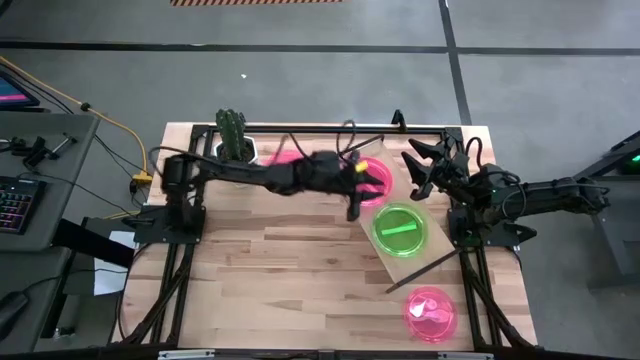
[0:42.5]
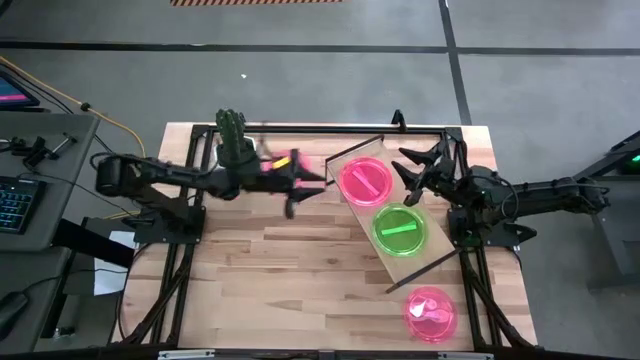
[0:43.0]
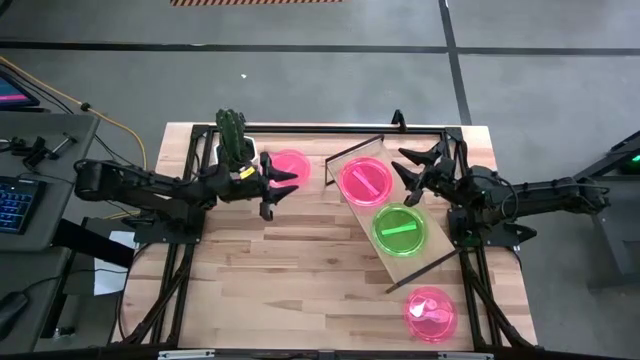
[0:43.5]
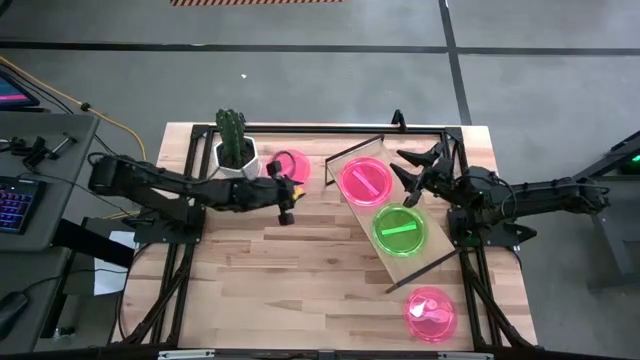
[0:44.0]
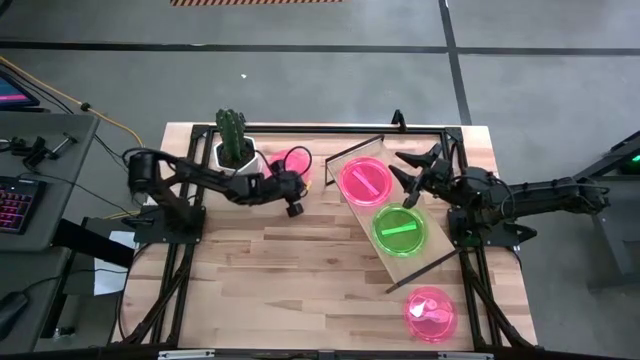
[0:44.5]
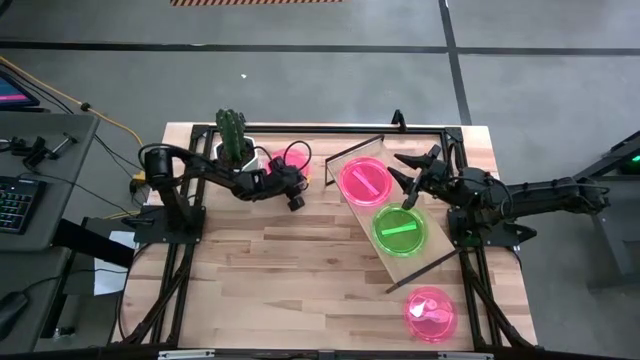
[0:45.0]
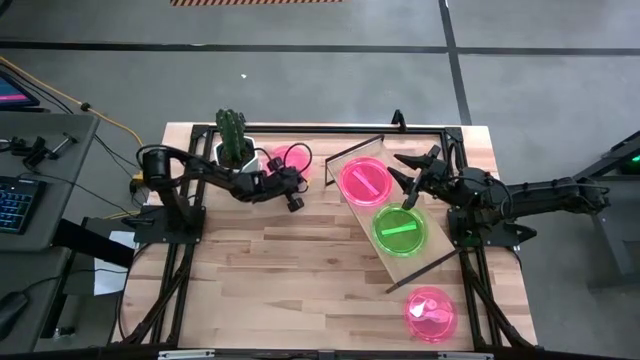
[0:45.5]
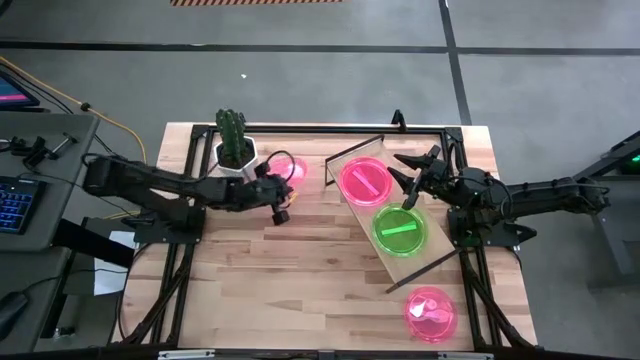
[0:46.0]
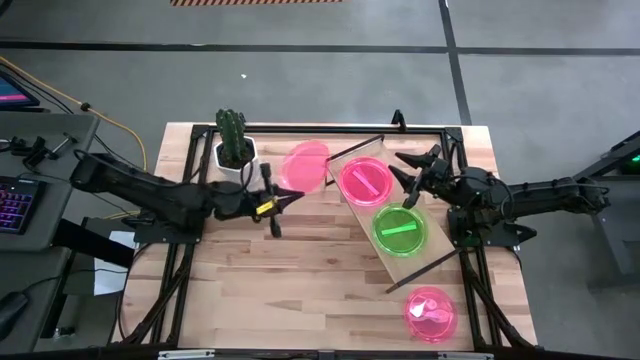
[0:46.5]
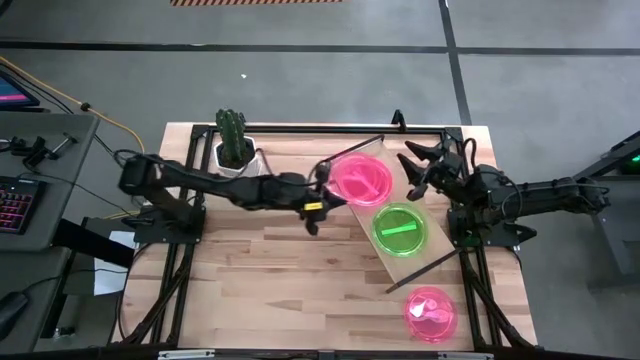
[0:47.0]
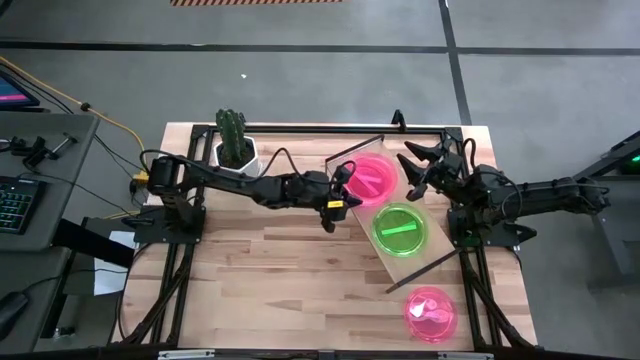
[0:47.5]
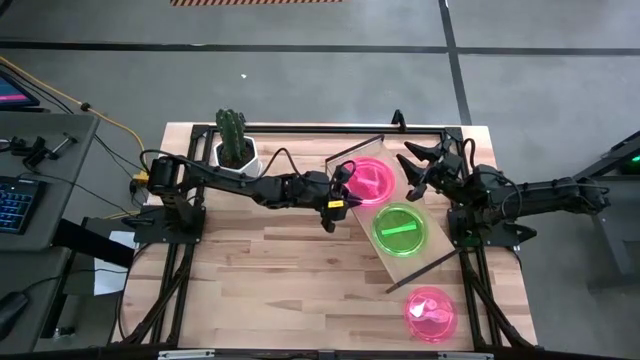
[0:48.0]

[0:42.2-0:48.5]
Task: Place and stack plates onto a shelf
Stack the pink plate on top of the other pink plate on the shelf

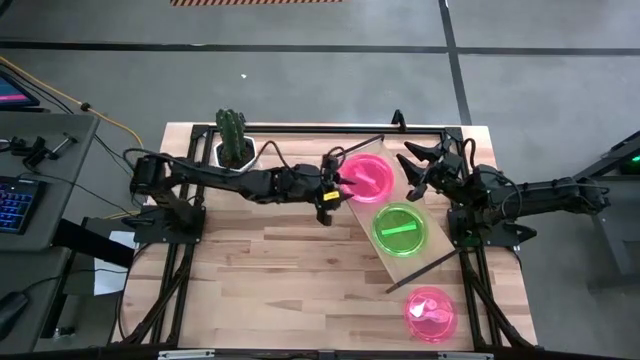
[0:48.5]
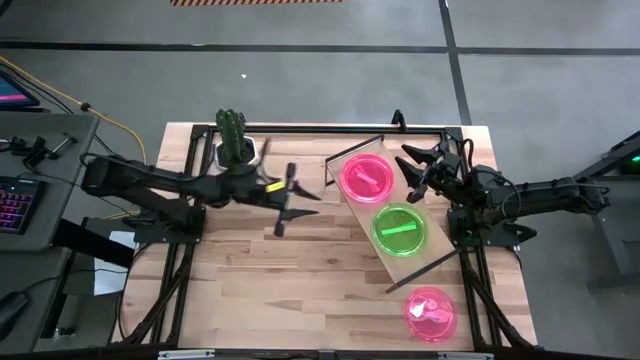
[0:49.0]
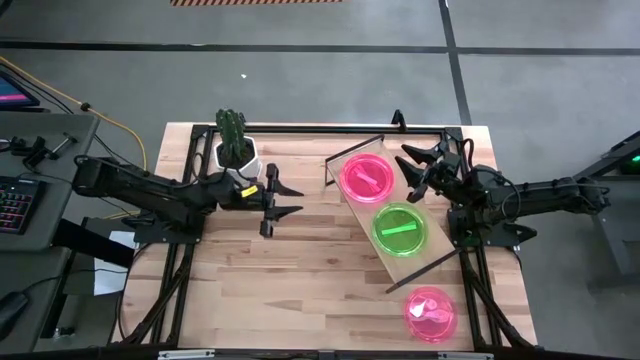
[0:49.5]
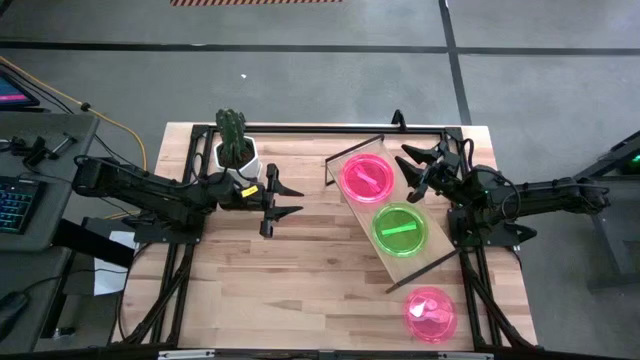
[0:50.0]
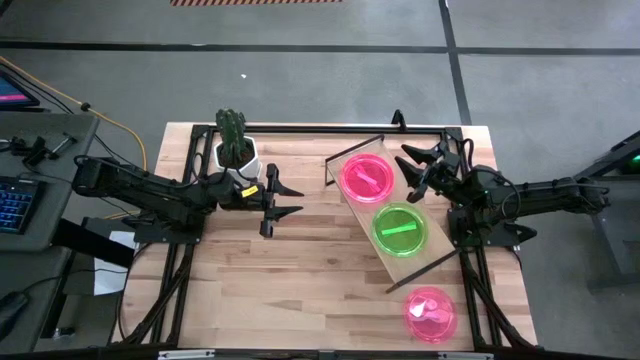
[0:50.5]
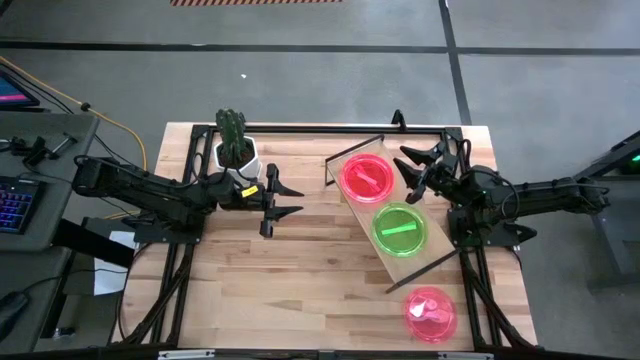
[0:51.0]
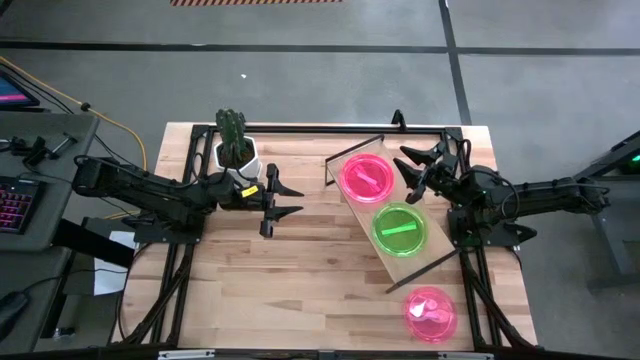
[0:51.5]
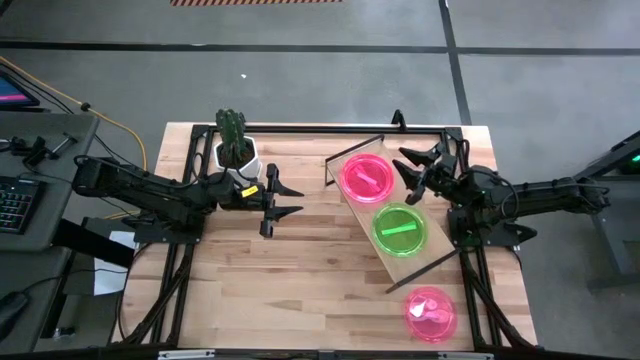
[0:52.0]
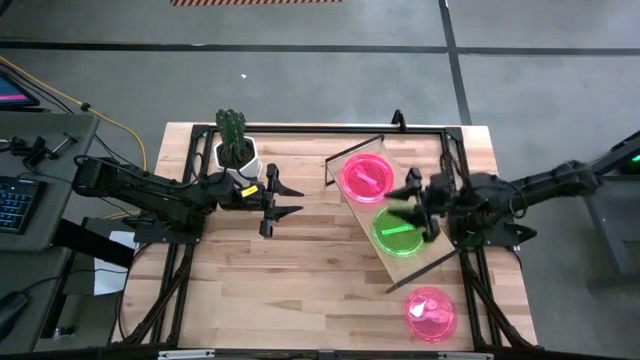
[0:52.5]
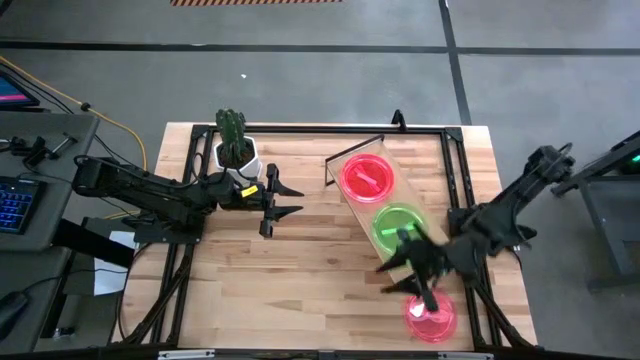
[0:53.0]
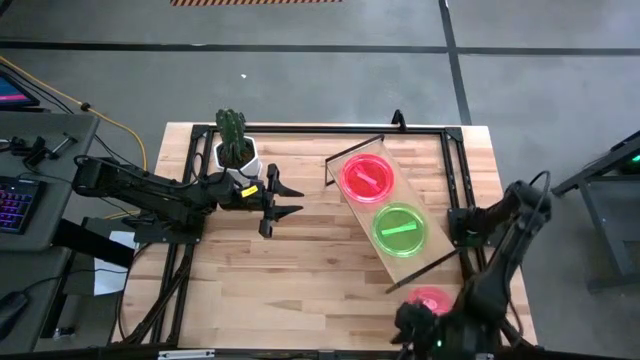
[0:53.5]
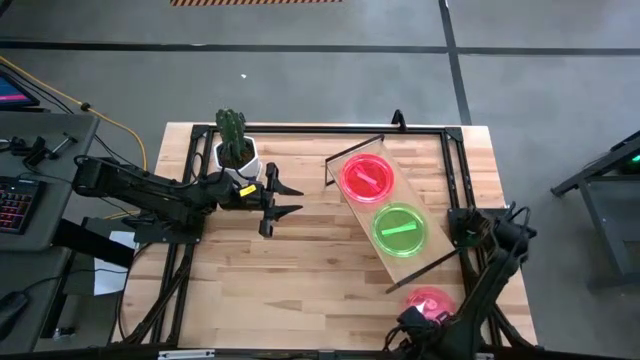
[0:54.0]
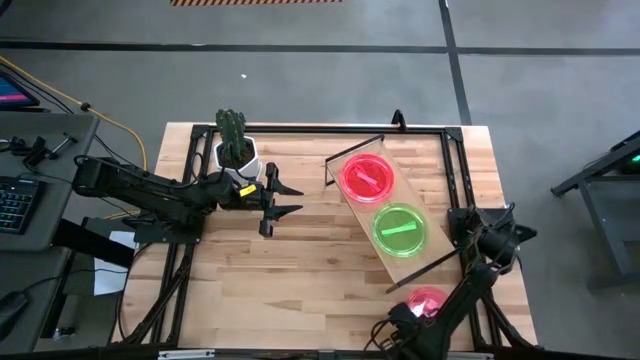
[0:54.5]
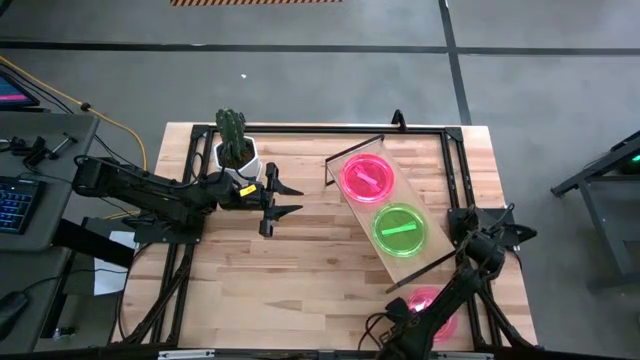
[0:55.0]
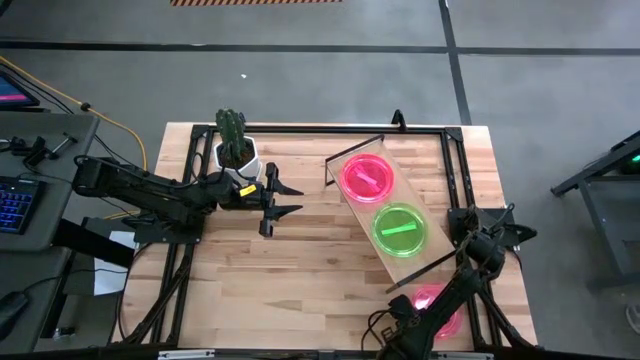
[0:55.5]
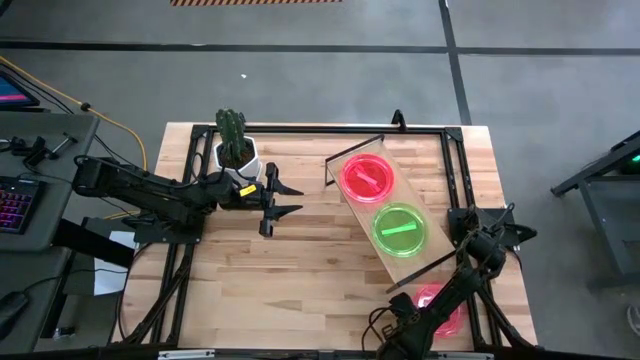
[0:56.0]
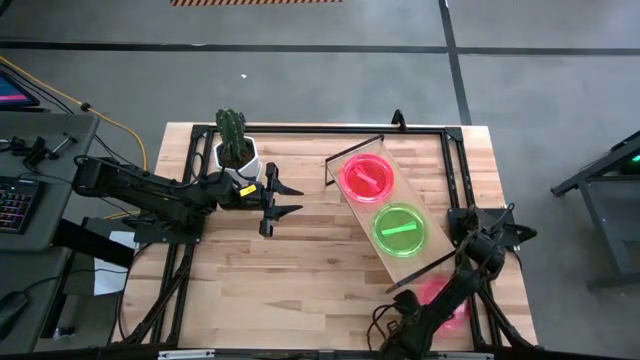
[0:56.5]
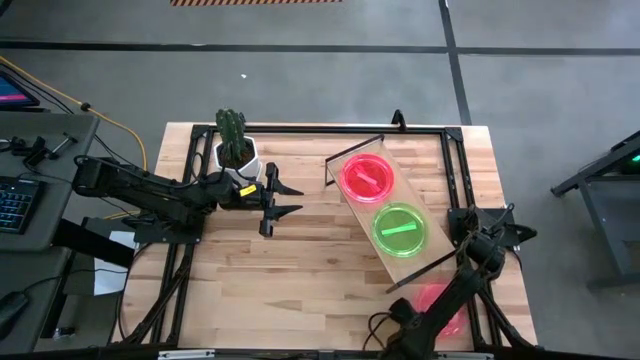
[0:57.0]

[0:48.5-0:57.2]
Stack the pink plate on top of the other pink plate on the shelf

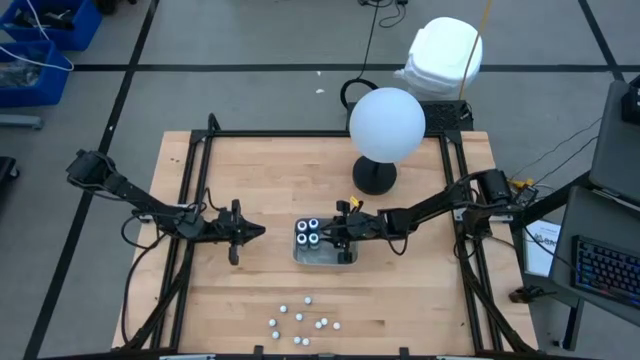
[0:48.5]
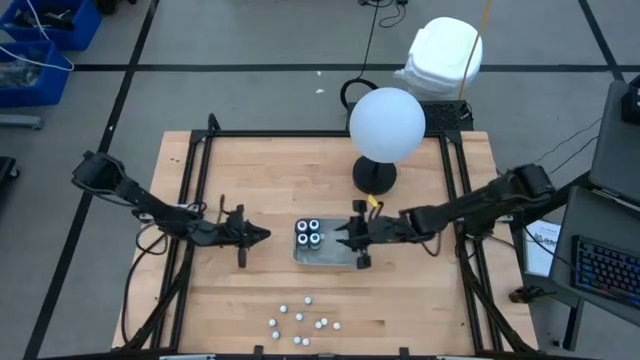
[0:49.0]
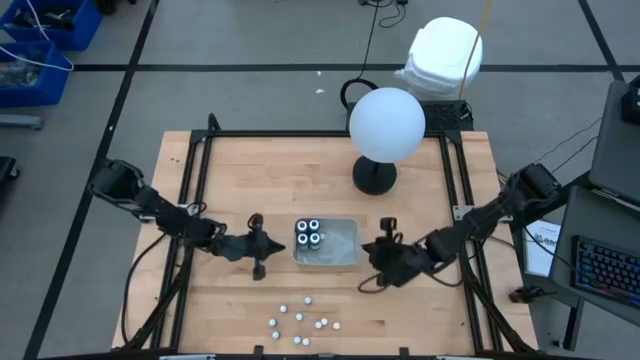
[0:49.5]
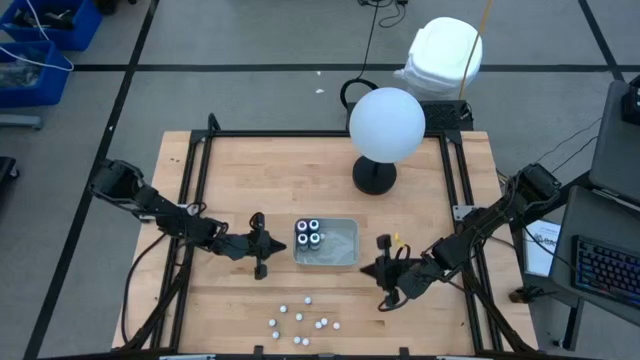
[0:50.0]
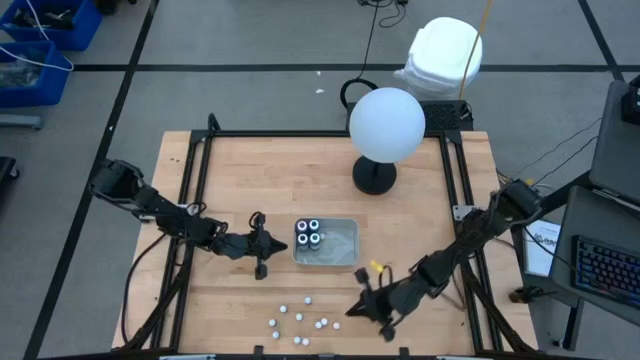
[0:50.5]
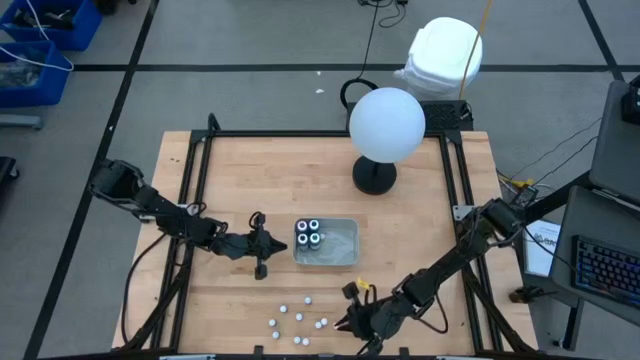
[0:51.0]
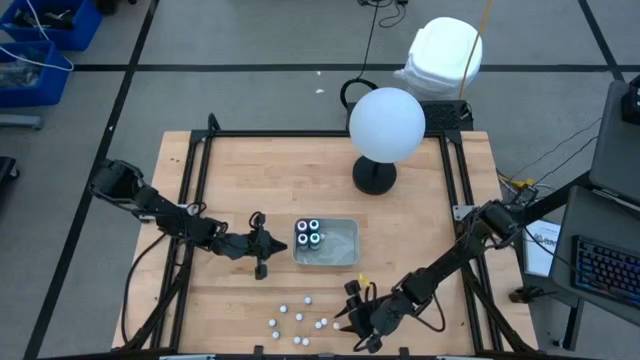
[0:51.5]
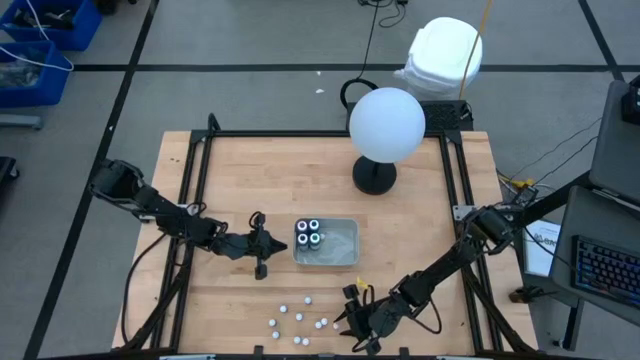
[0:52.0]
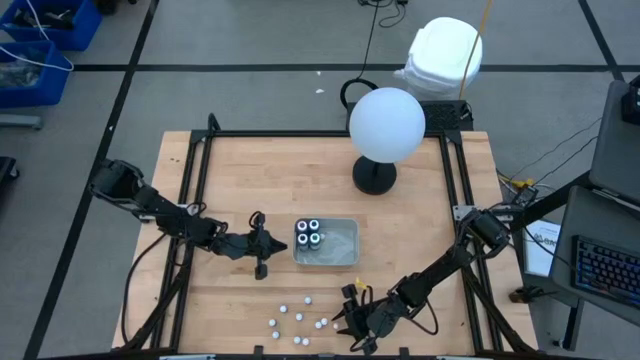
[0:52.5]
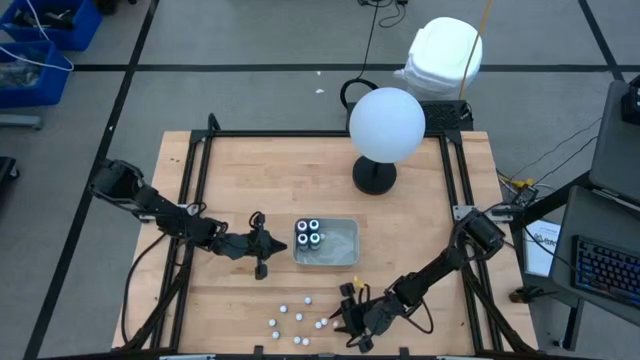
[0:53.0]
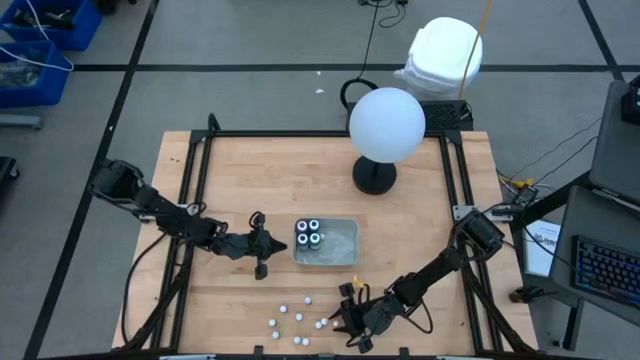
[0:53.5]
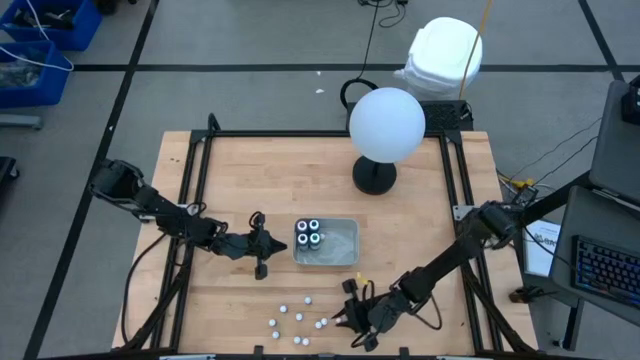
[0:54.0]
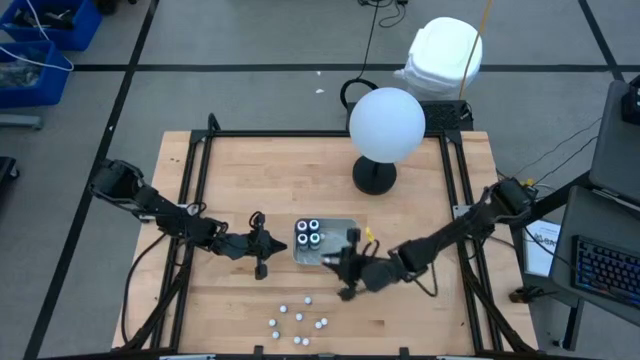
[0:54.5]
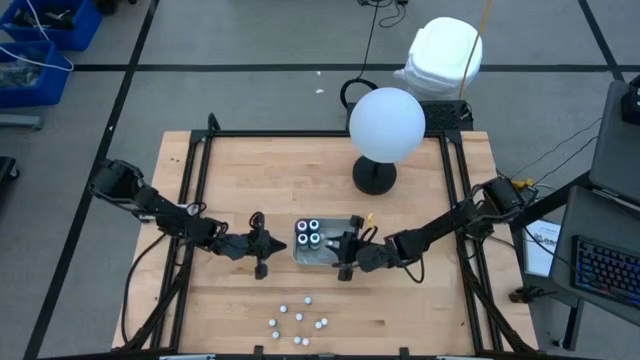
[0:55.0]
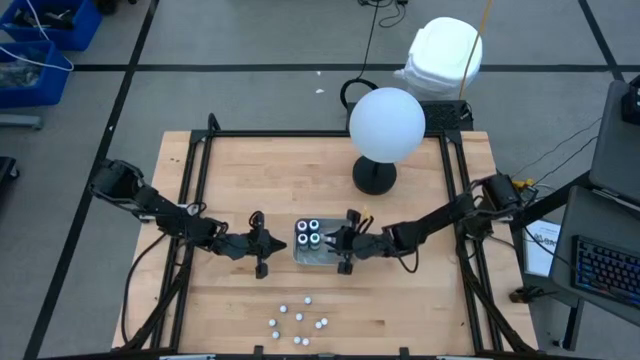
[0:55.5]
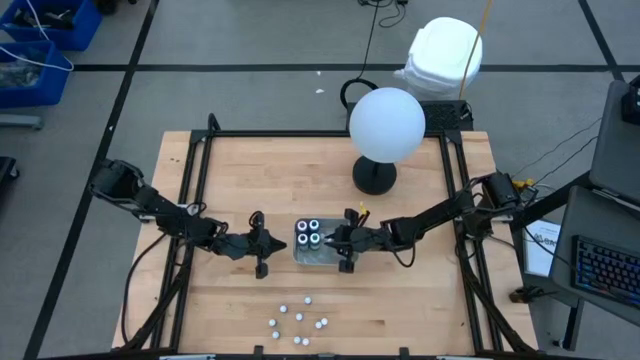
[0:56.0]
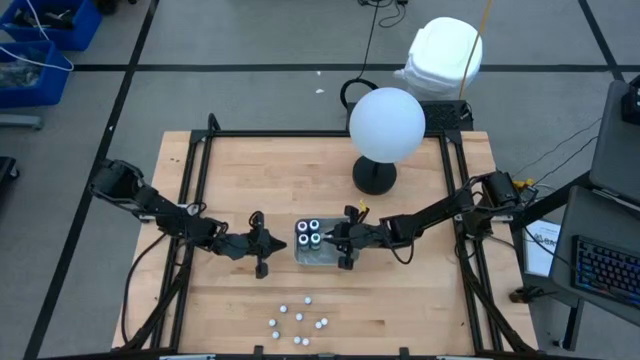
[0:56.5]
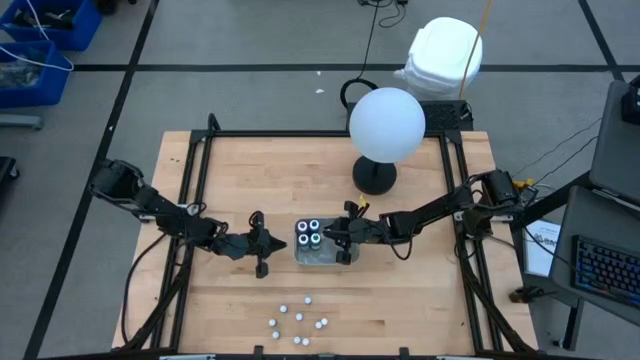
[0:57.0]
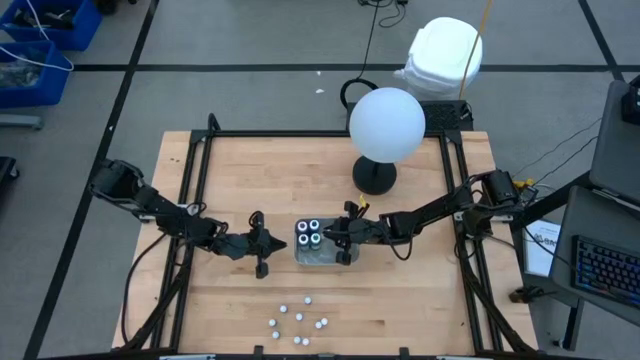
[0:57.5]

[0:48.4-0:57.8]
Task: Pick & Place food coloring
Put the small yellow food coloring bottle into the gray bin
